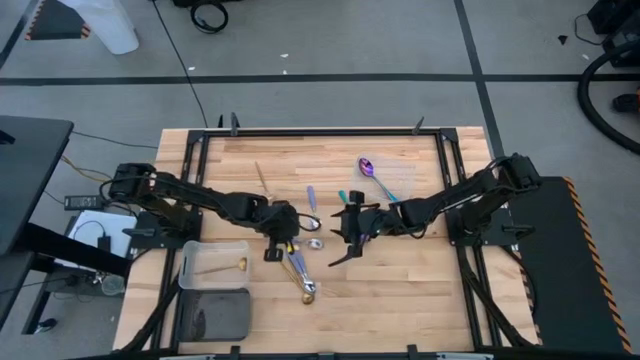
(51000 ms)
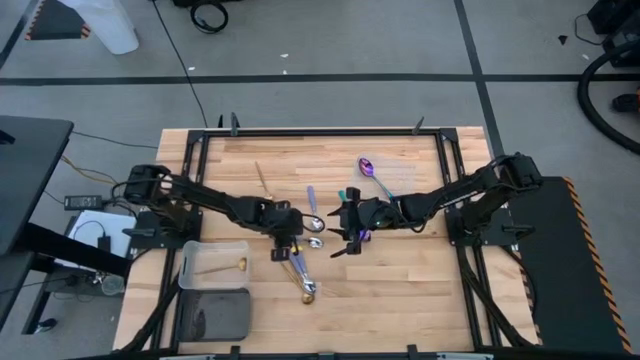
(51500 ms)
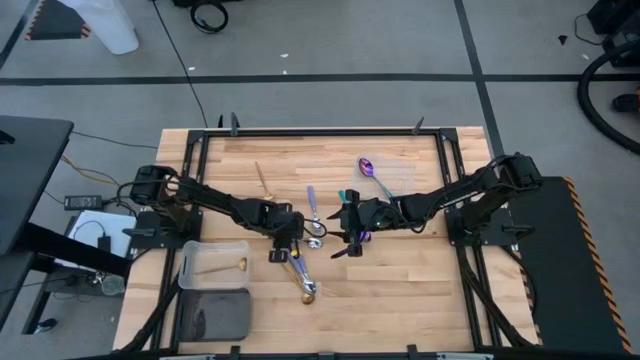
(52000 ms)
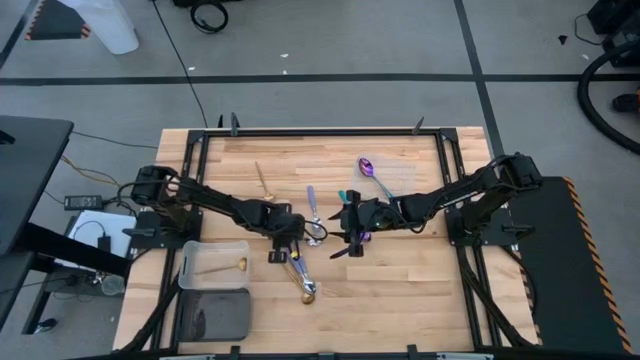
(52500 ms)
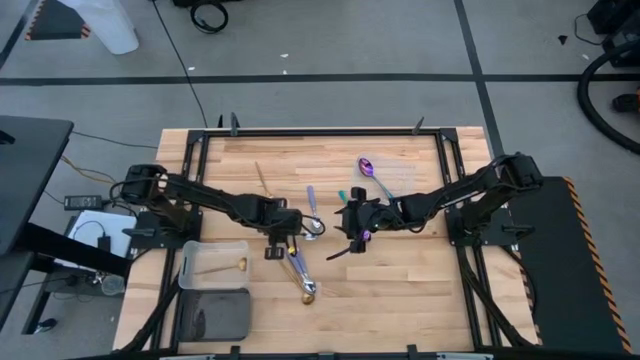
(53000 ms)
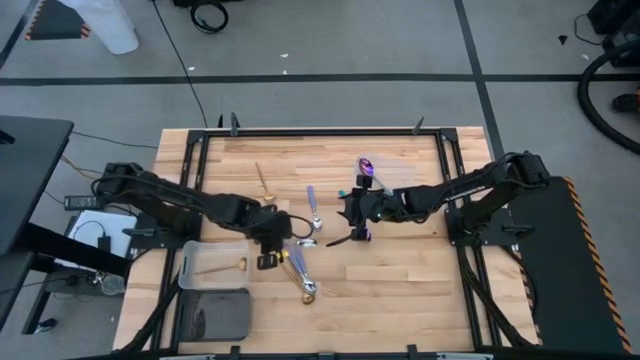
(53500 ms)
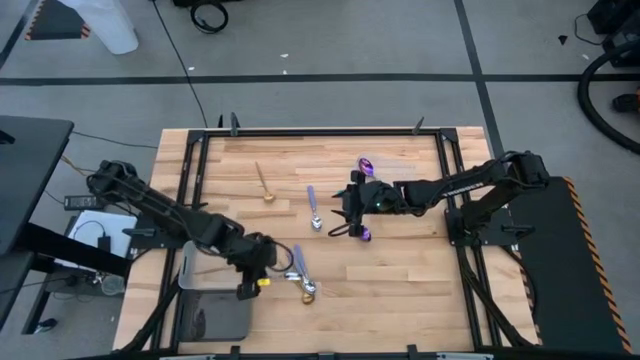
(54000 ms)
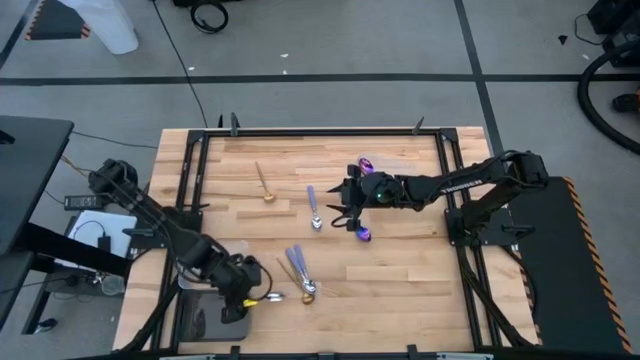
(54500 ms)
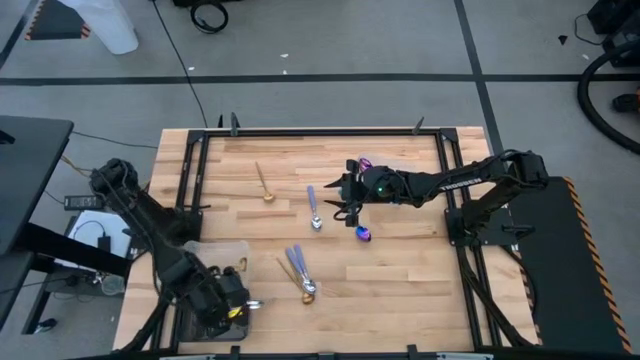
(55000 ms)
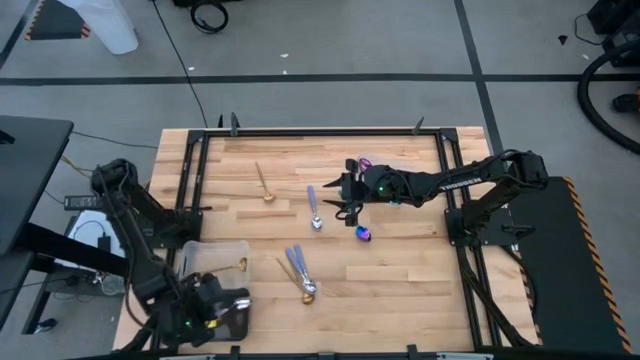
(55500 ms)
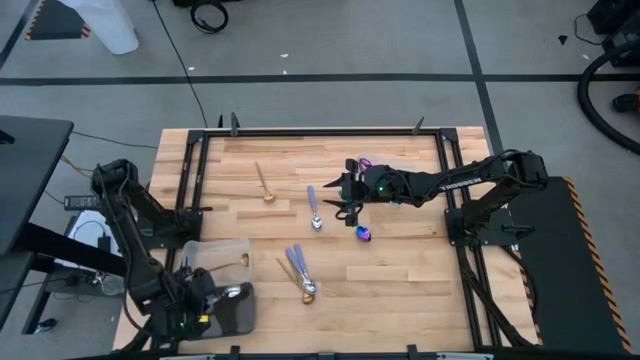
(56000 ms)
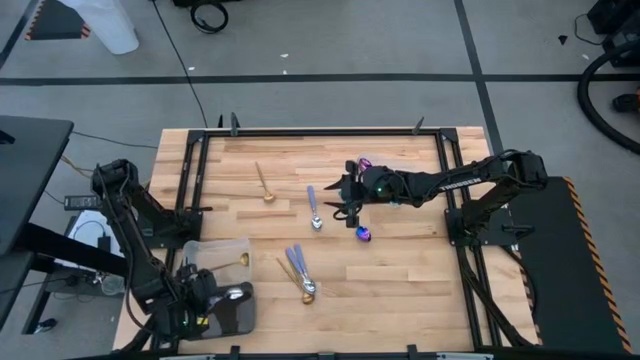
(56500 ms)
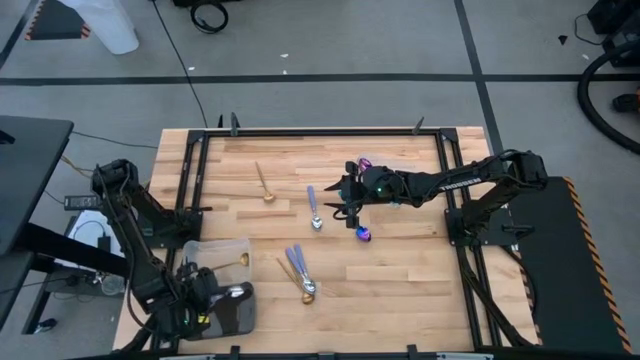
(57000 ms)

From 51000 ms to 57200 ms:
Task: Sort silverware by color (type)
Put the purple spoon into the black bin

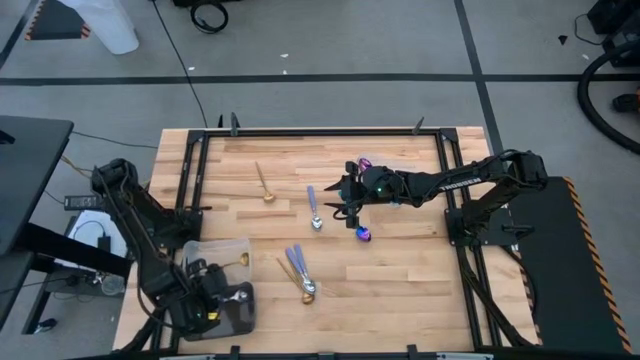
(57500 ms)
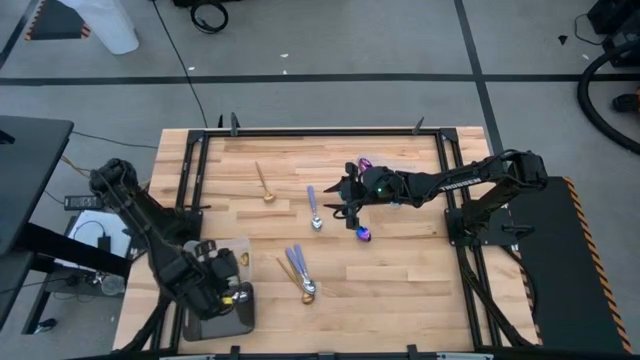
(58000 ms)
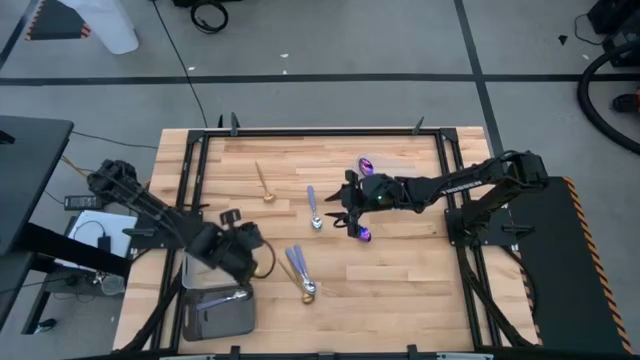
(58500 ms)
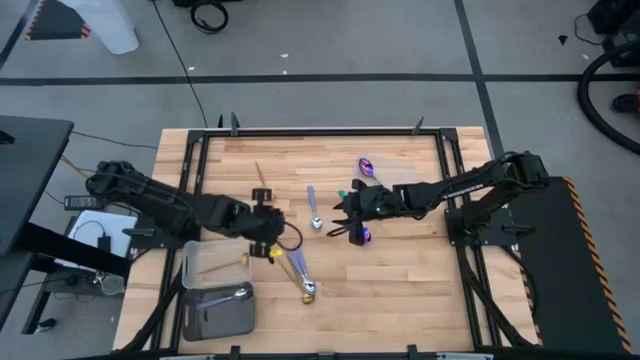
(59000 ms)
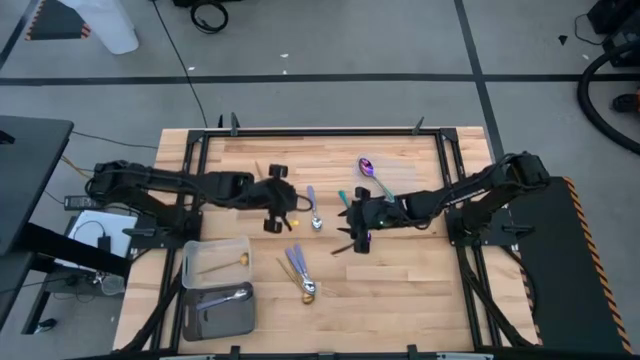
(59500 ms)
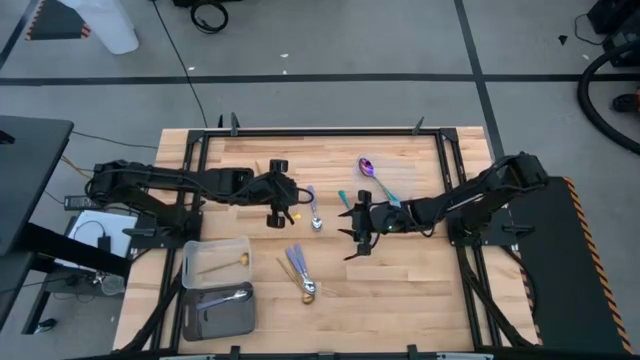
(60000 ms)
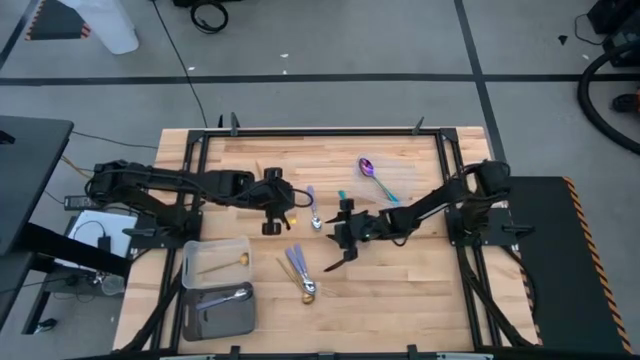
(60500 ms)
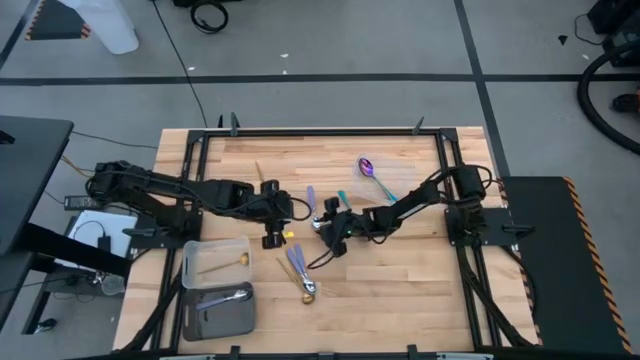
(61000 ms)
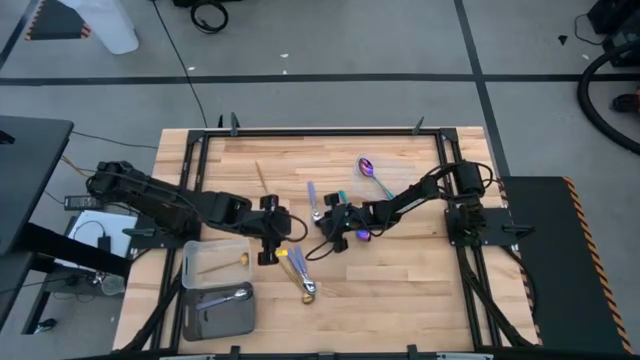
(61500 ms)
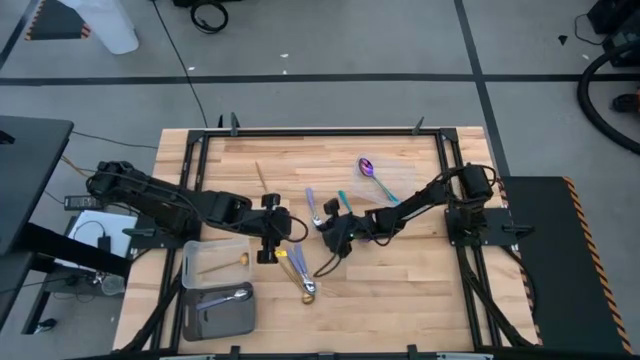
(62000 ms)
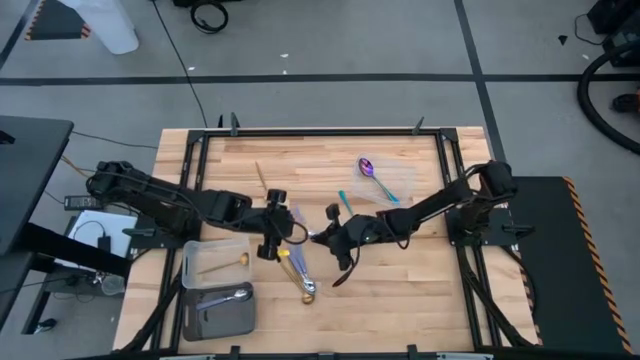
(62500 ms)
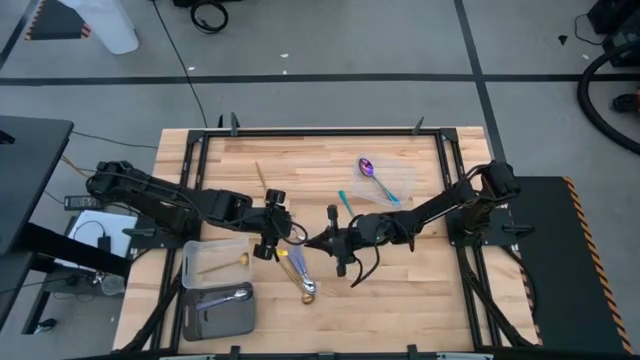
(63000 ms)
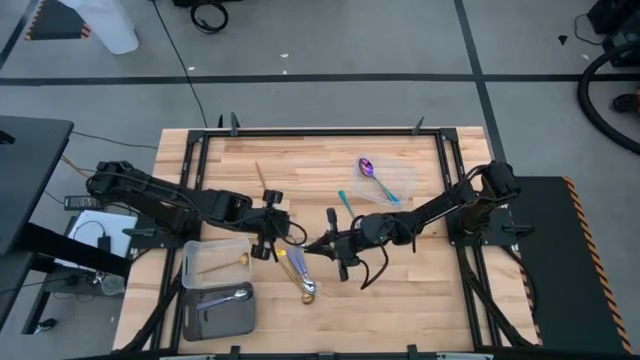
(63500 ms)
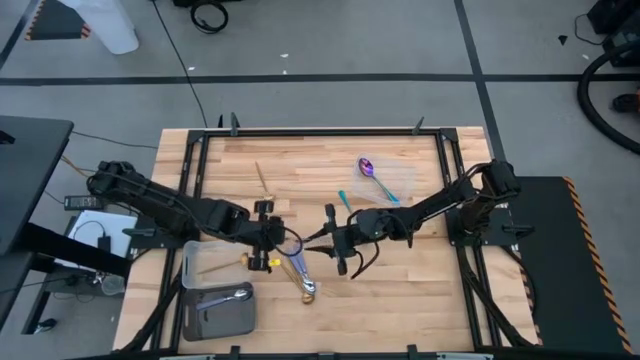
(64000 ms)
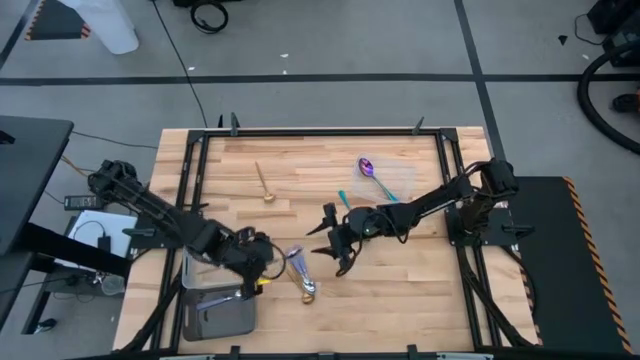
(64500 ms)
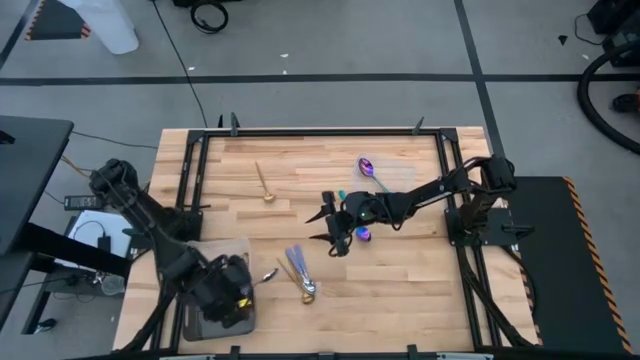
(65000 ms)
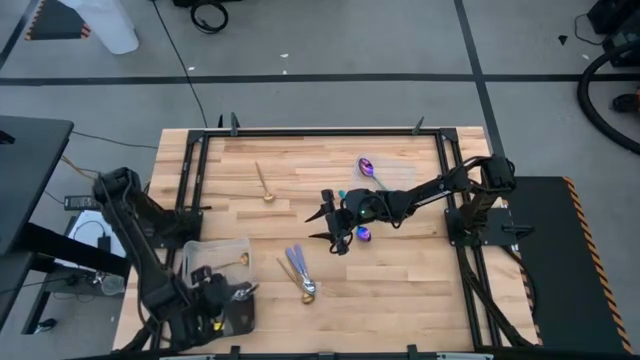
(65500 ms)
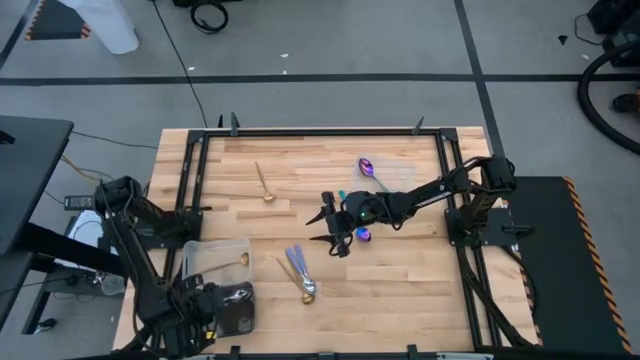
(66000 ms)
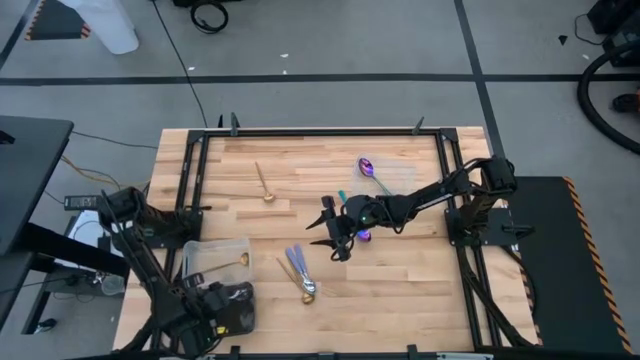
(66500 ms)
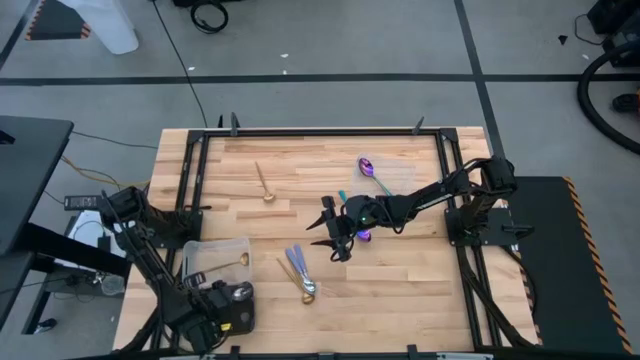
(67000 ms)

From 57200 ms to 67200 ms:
Put the purple spoon into the black bin

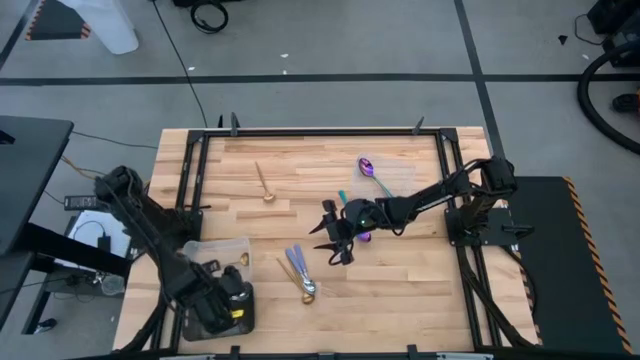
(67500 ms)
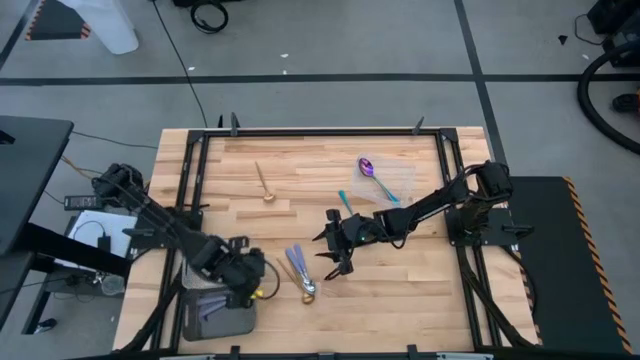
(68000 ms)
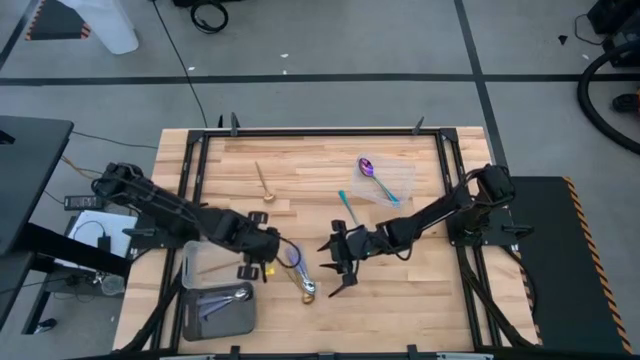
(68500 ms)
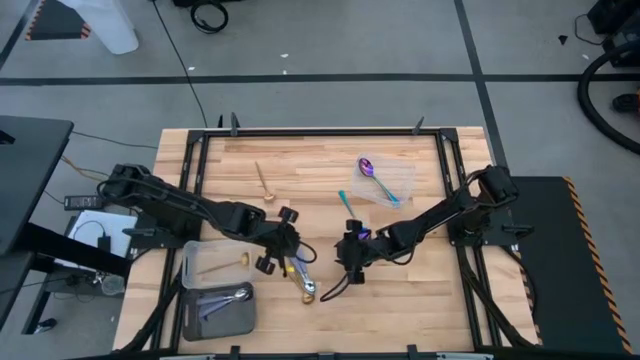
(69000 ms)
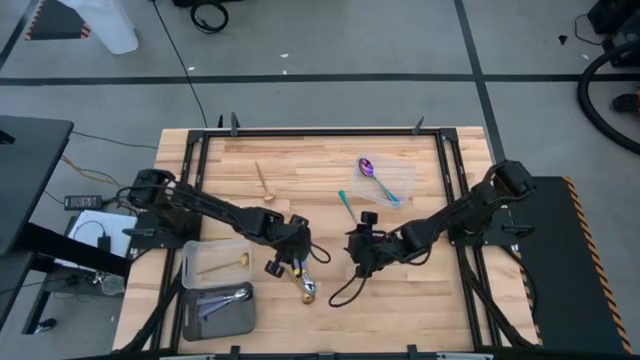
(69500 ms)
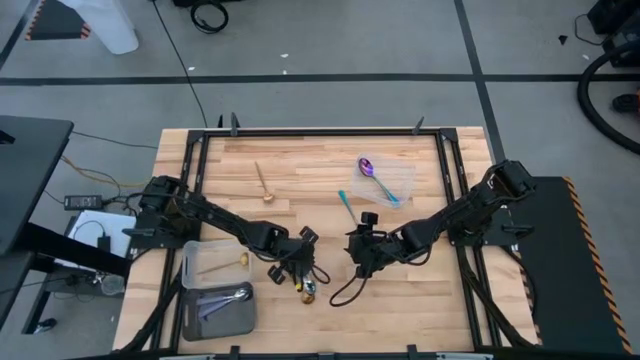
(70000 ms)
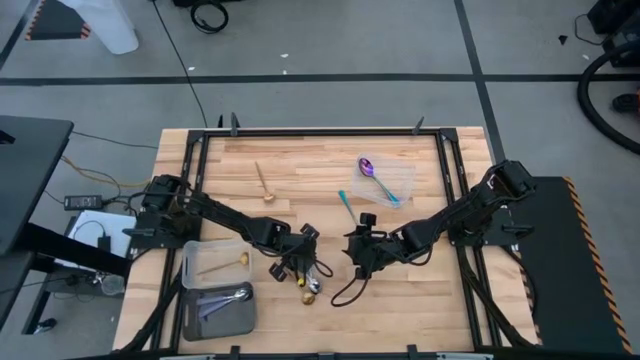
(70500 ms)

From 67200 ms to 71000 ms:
Put the purple spoon into the black bin

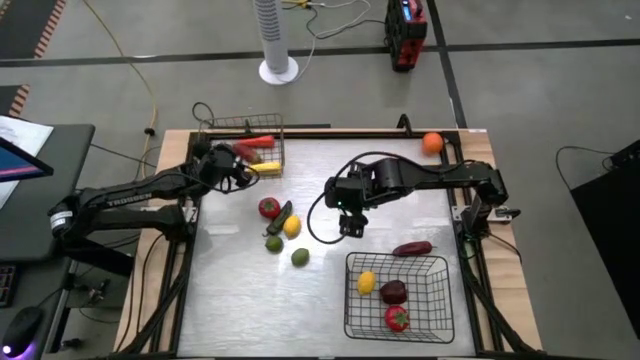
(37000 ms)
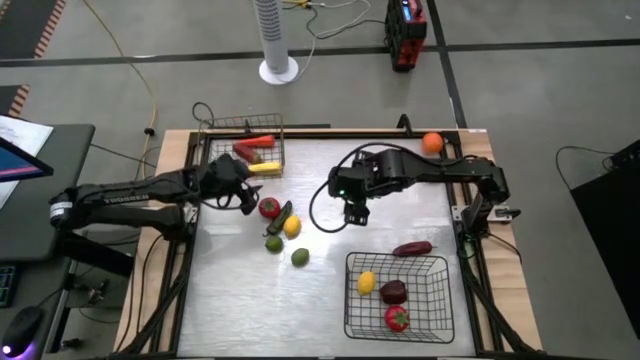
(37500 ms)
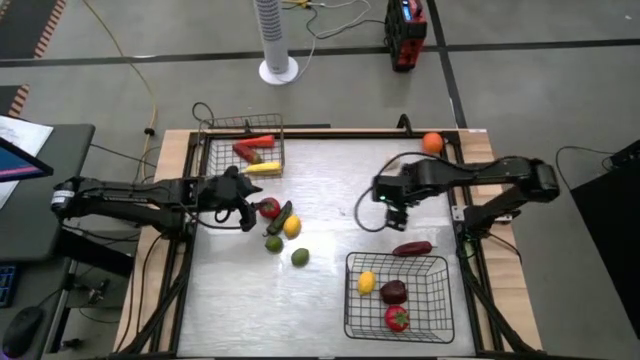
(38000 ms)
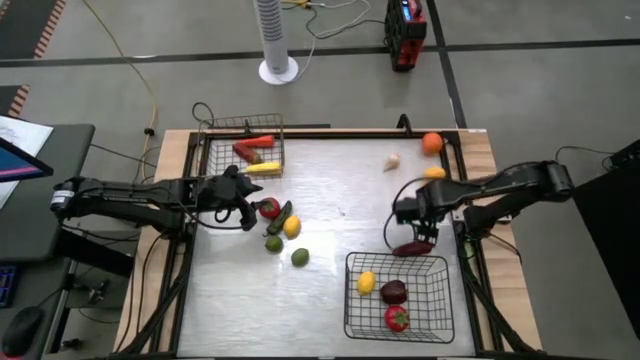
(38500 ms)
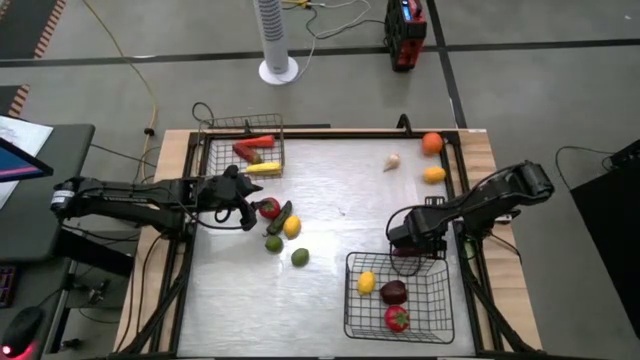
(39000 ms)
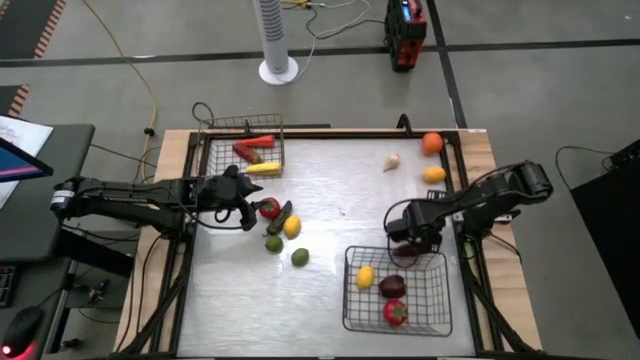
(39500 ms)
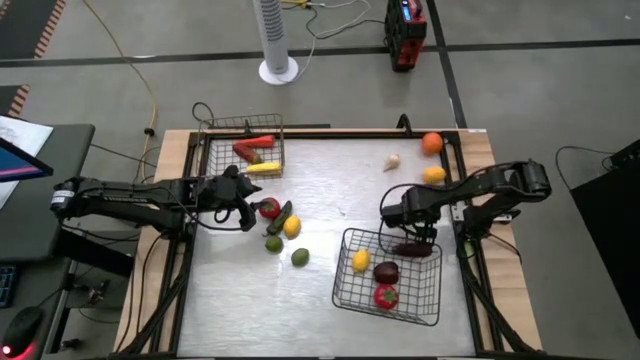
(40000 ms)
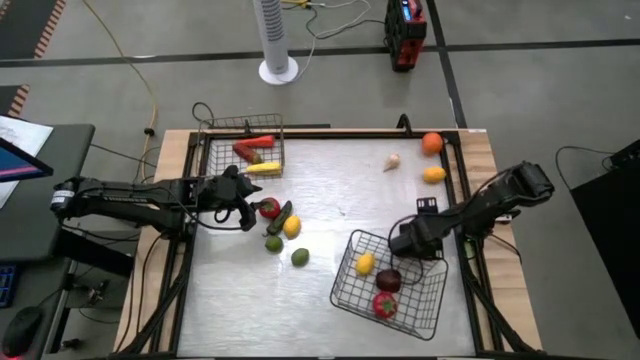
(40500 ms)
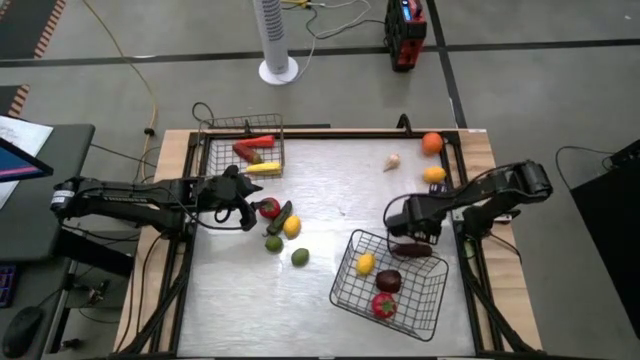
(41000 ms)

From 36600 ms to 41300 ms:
Task: Sort produce into baskets
Put the chili pepper into the top wire basket
